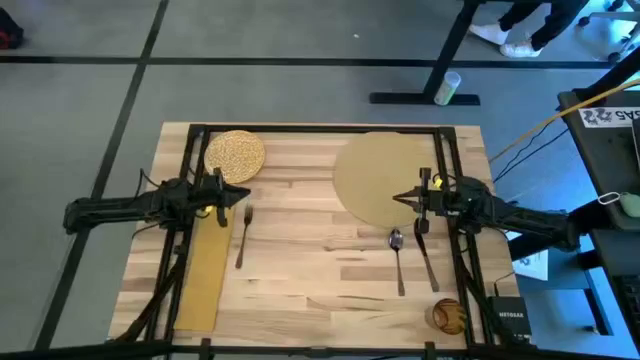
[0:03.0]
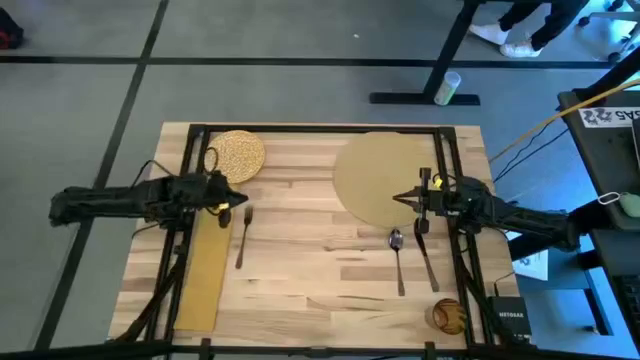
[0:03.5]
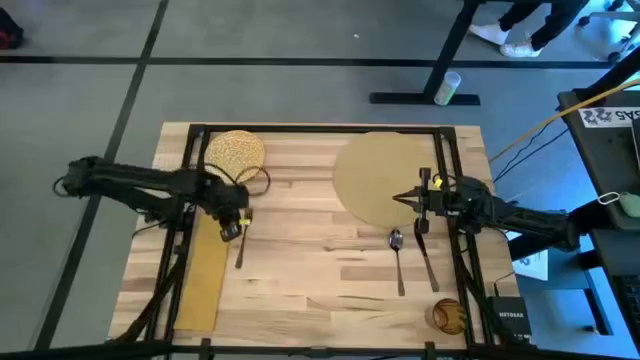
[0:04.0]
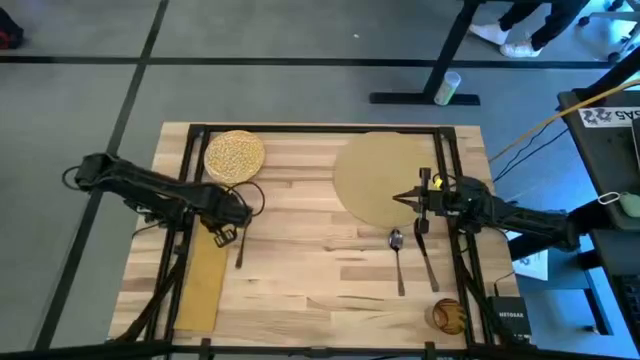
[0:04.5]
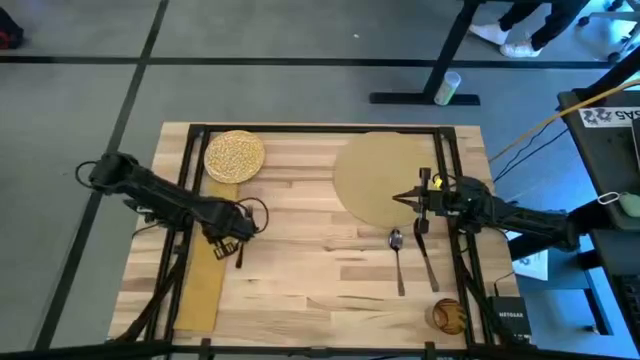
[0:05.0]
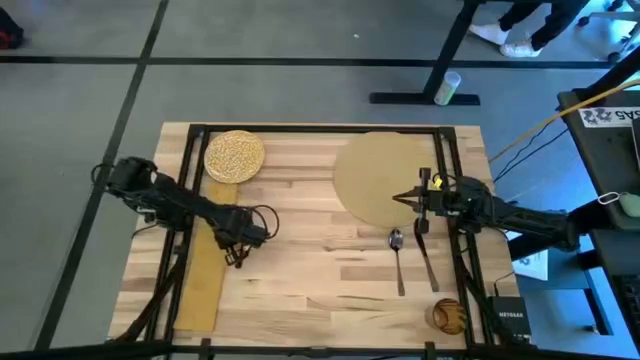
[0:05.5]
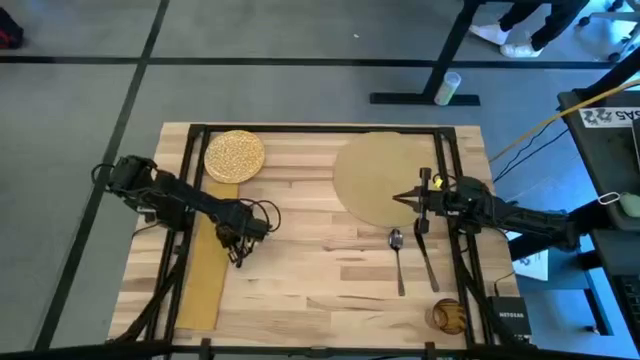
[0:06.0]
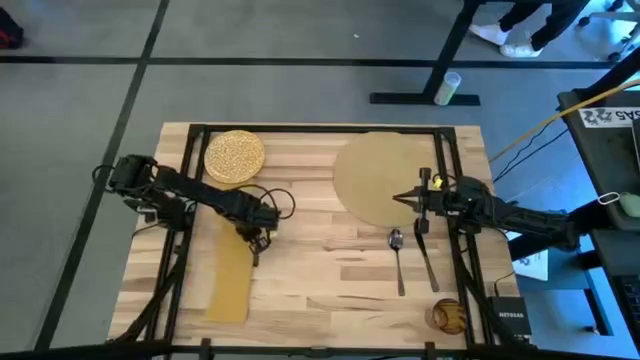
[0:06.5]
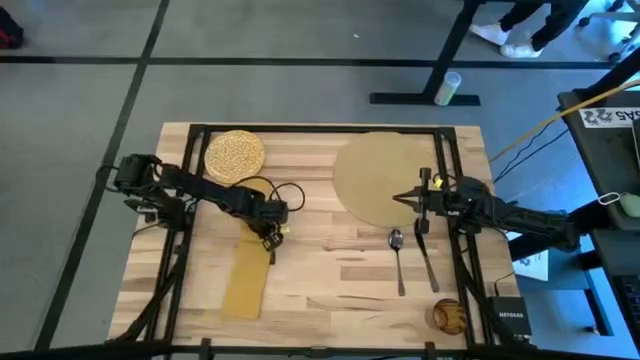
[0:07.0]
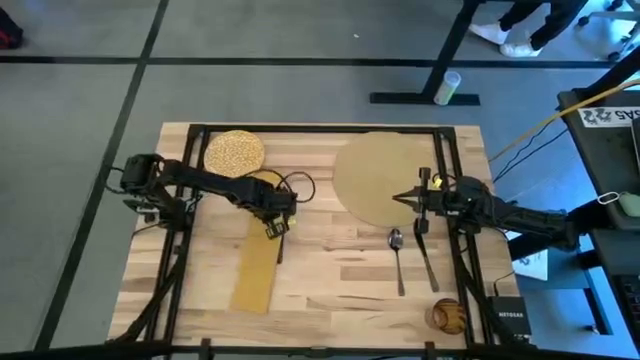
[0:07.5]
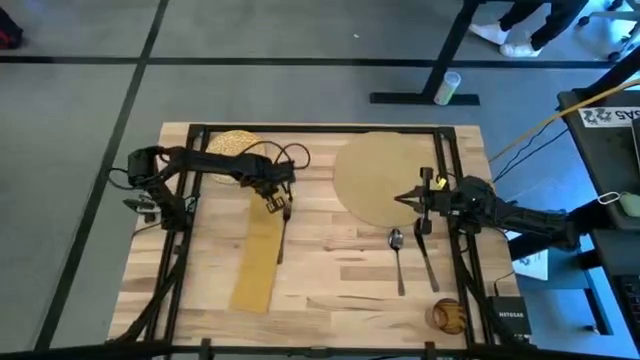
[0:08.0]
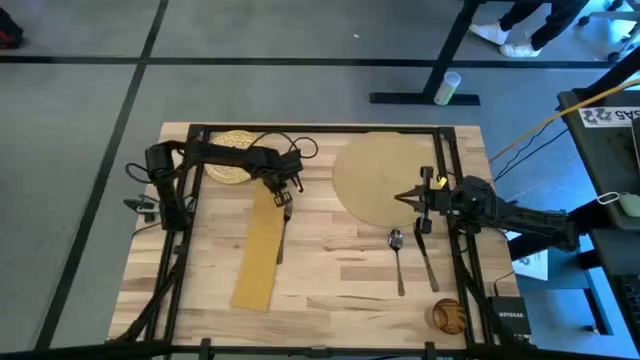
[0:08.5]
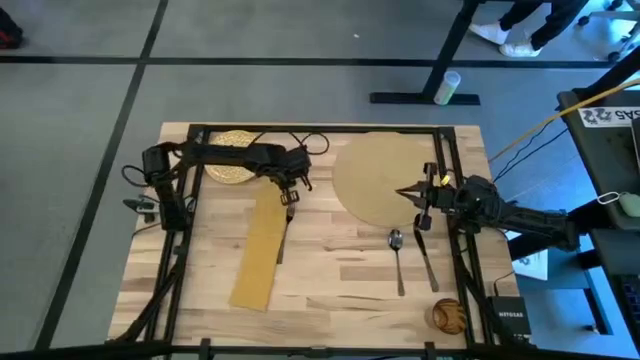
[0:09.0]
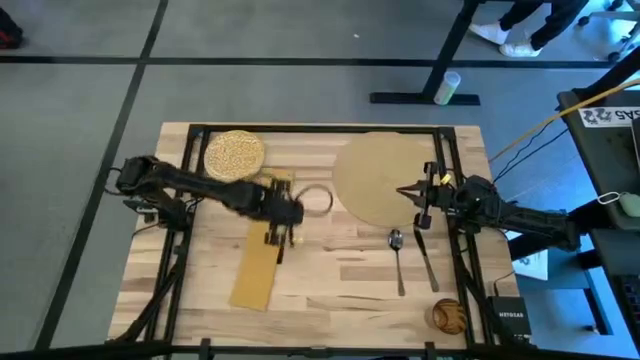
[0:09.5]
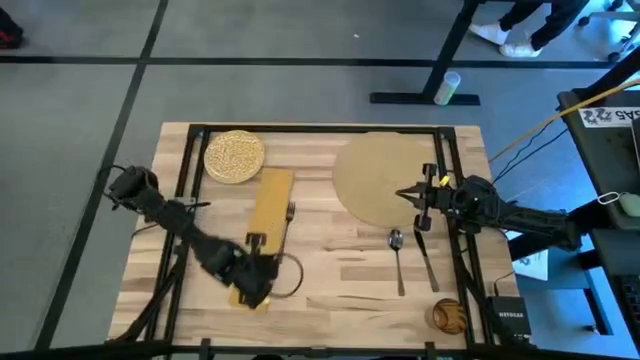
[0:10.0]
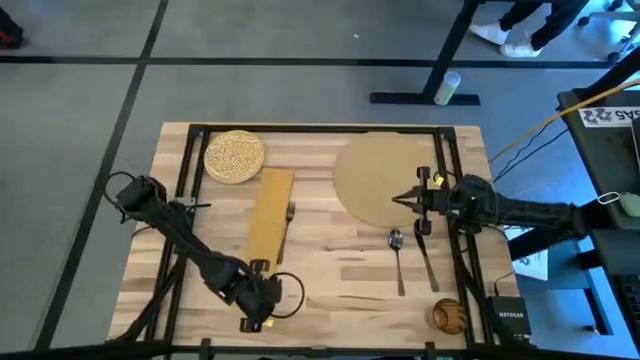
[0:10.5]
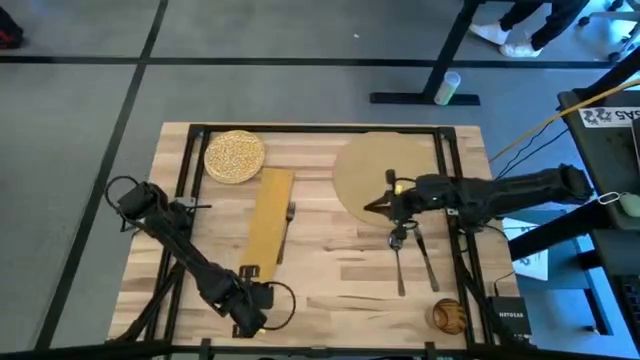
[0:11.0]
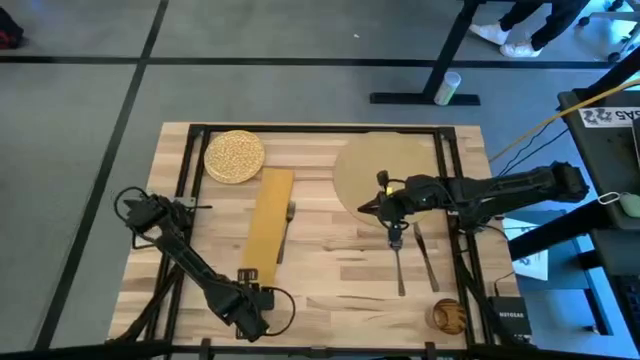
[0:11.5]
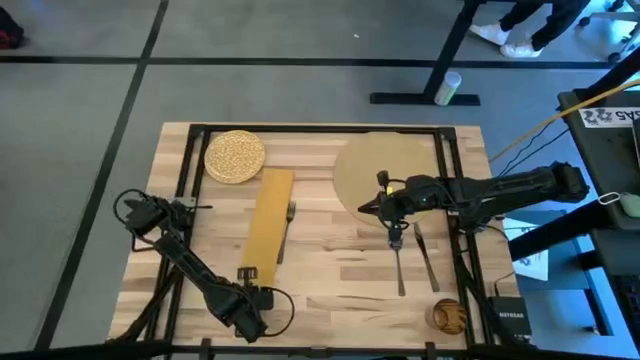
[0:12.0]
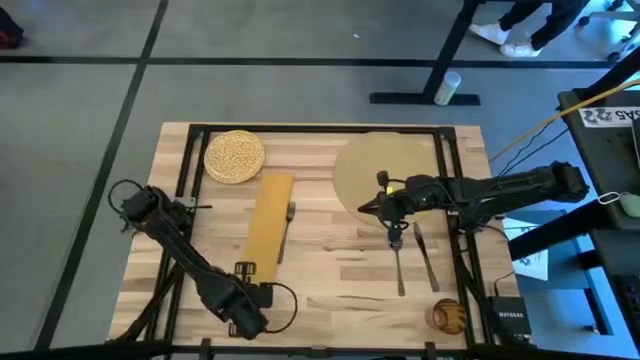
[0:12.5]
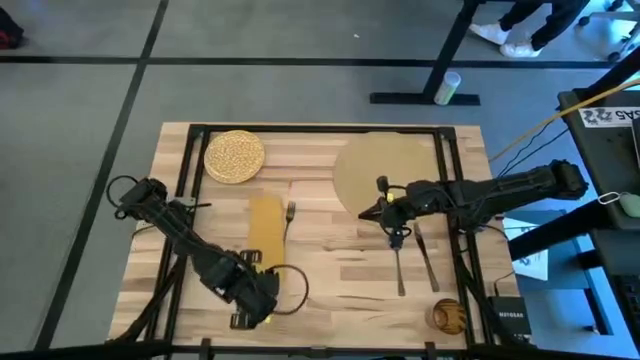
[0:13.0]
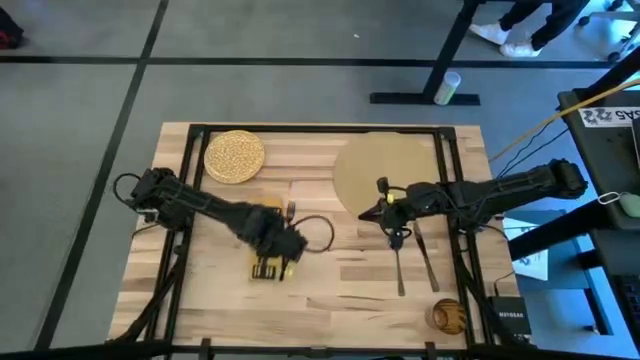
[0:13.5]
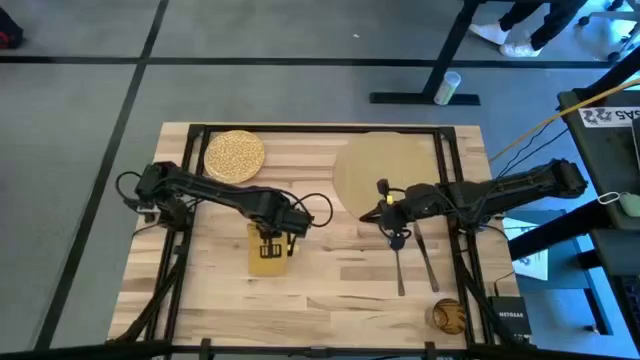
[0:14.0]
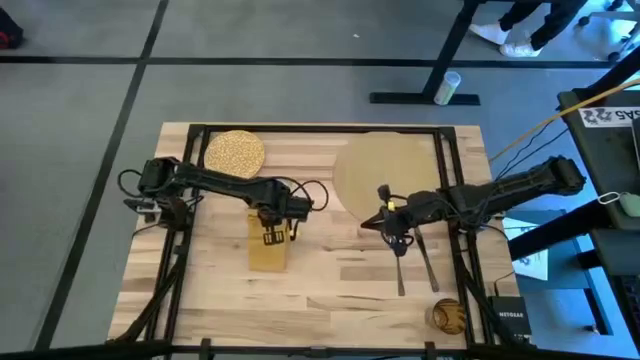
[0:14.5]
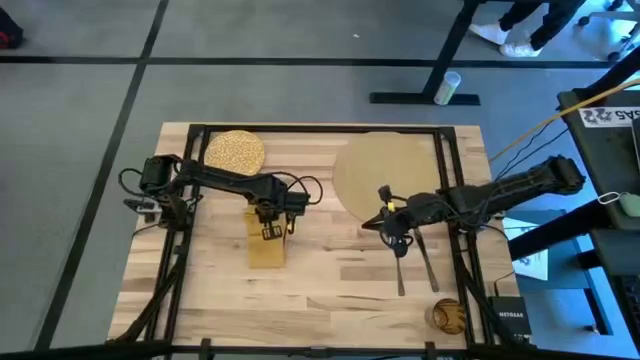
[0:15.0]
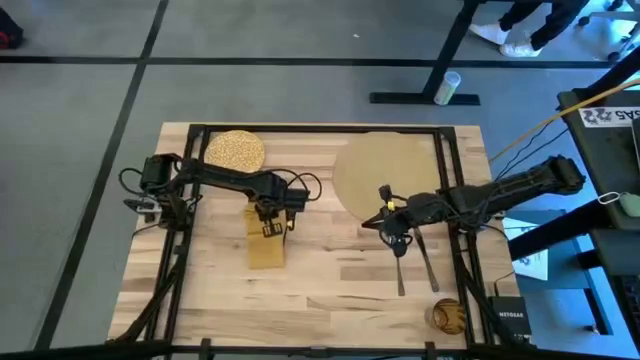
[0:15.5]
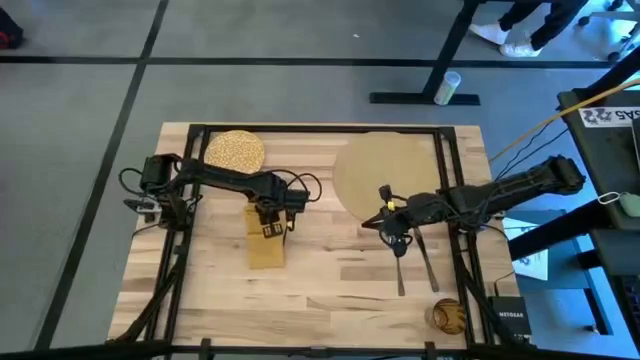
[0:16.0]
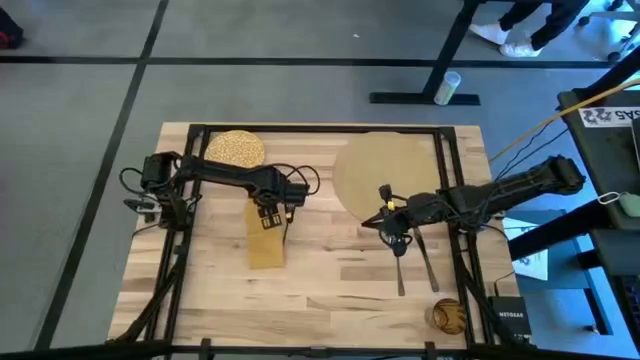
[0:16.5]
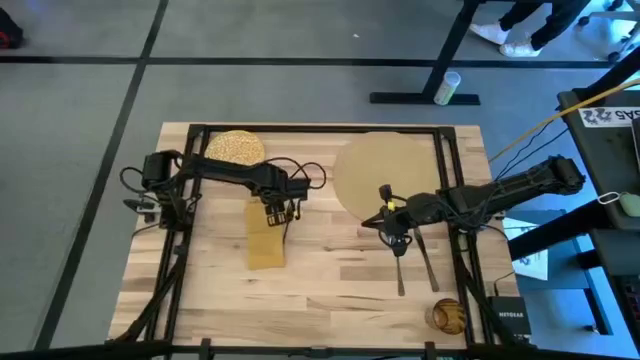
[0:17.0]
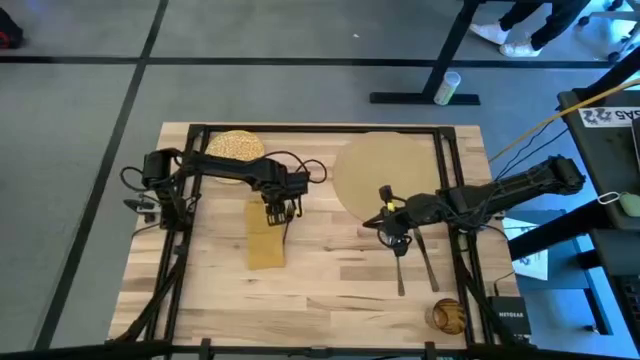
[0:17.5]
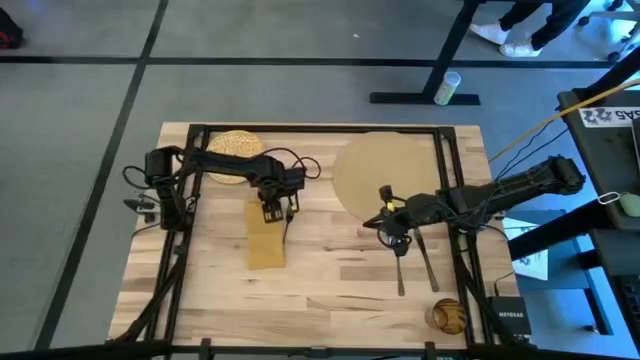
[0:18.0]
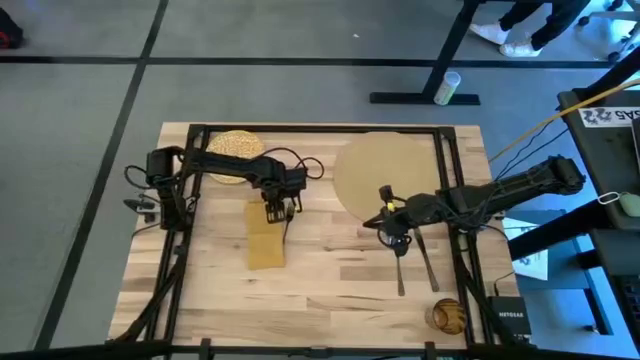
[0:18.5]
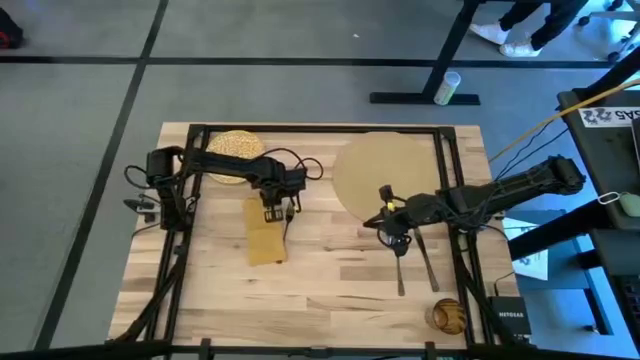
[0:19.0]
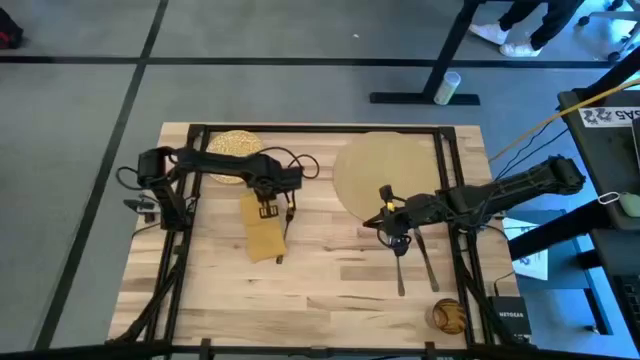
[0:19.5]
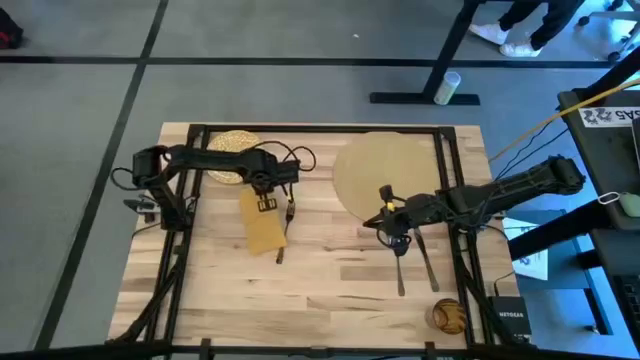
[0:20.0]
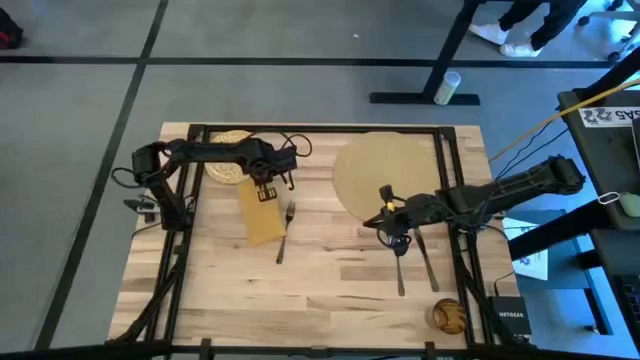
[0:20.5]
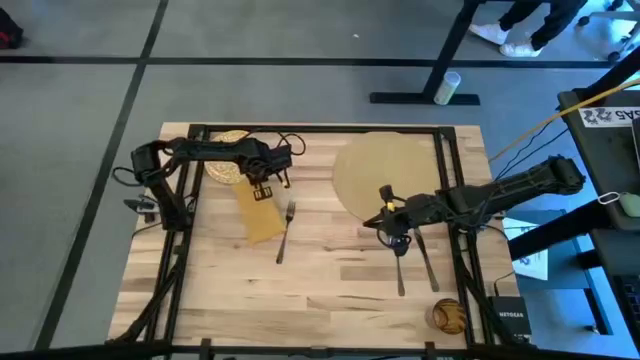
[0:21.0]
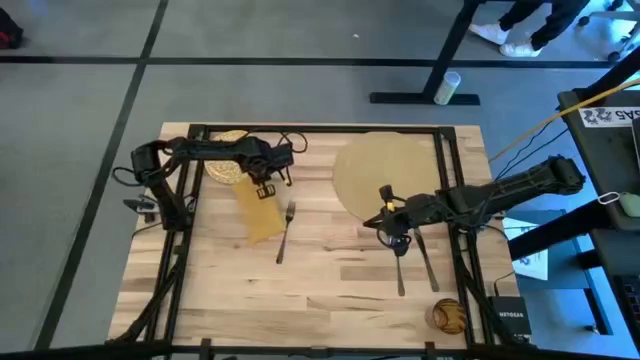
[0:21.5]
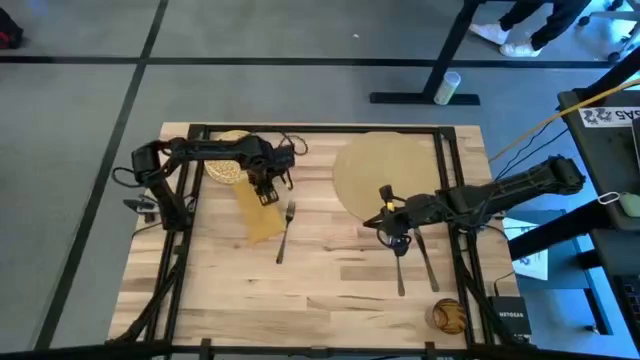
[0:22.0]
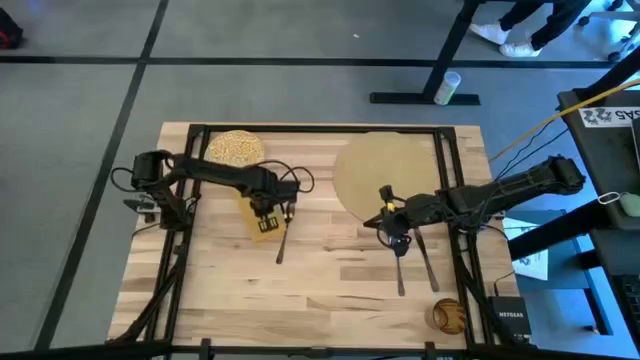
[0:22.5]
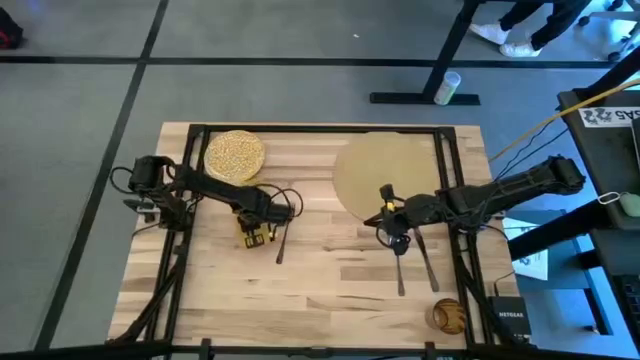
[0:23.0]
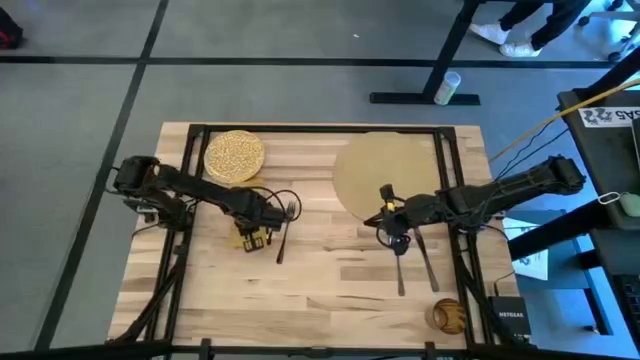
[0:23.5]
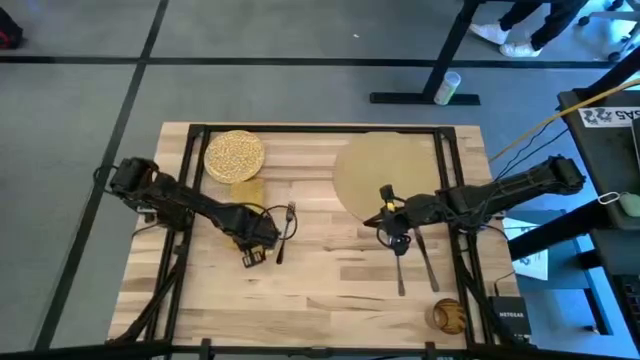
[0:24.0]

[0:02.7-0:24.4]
Task: Set table place
Fold the yellow napkin
